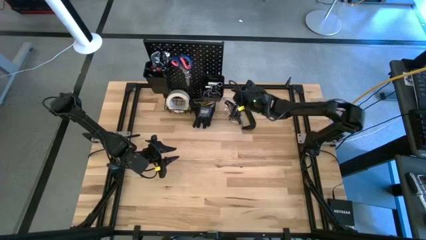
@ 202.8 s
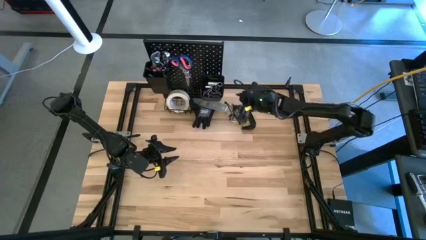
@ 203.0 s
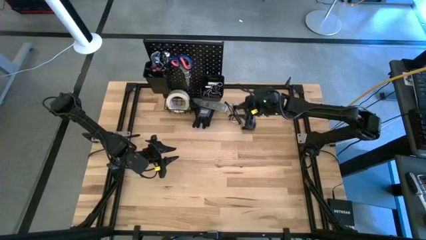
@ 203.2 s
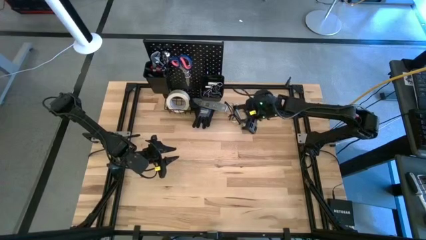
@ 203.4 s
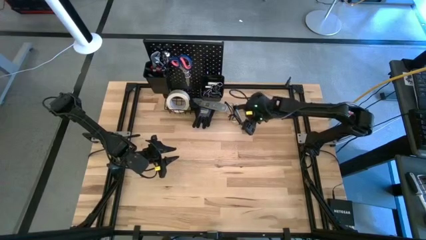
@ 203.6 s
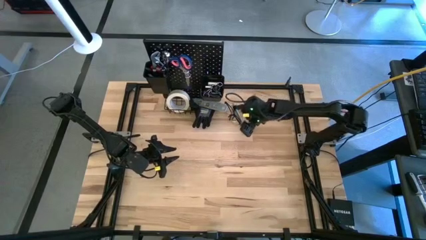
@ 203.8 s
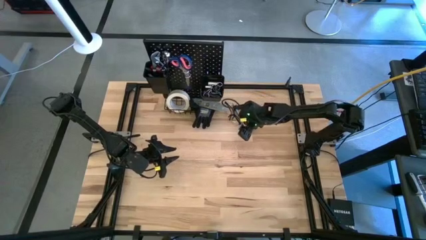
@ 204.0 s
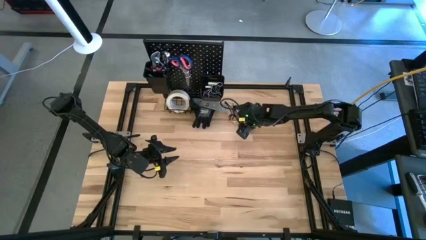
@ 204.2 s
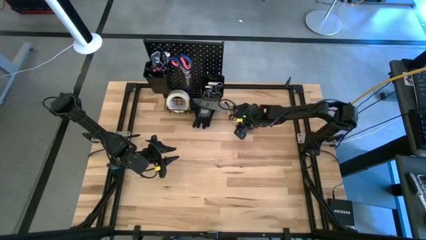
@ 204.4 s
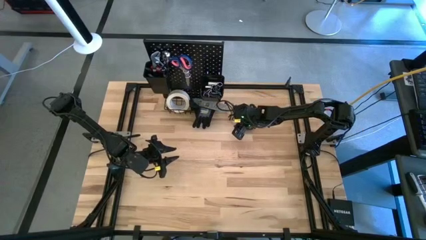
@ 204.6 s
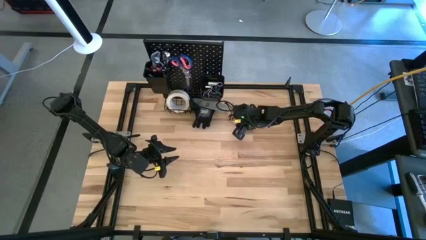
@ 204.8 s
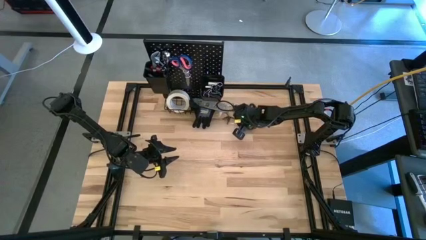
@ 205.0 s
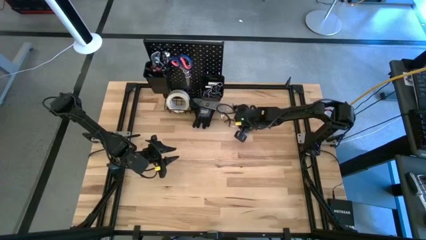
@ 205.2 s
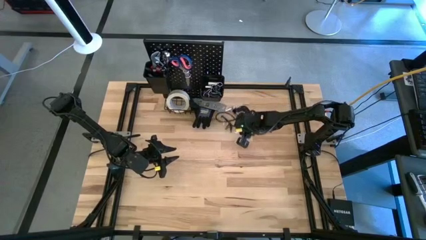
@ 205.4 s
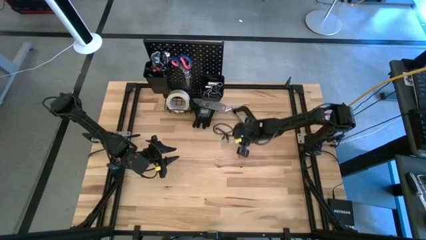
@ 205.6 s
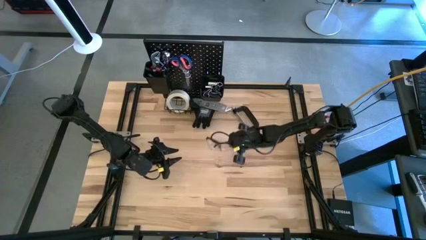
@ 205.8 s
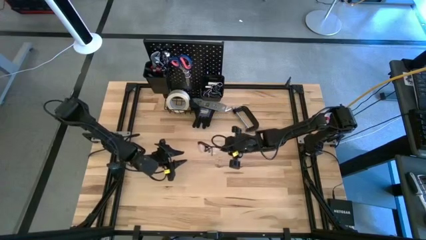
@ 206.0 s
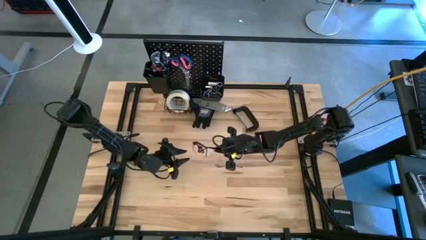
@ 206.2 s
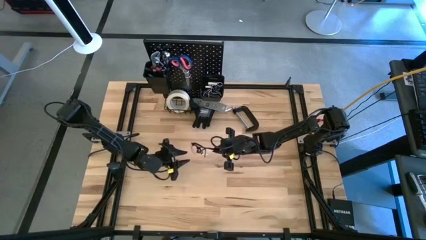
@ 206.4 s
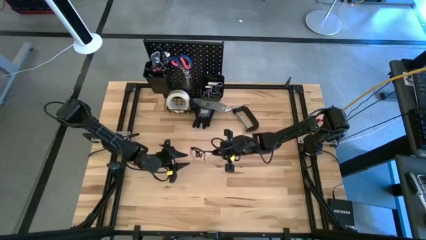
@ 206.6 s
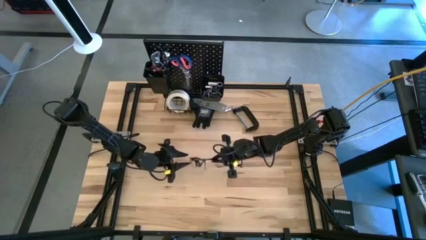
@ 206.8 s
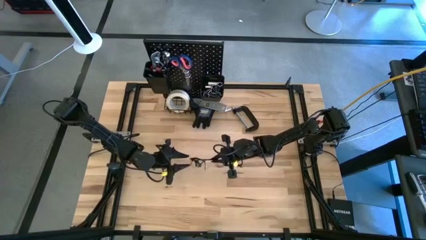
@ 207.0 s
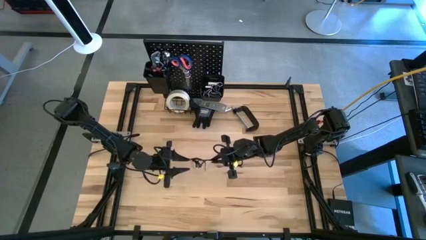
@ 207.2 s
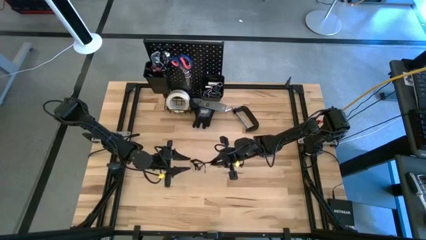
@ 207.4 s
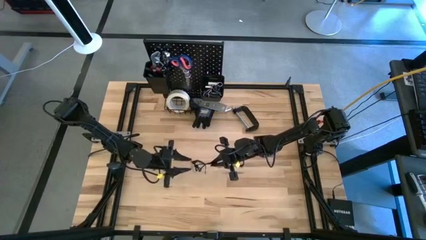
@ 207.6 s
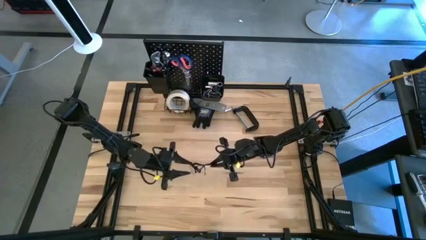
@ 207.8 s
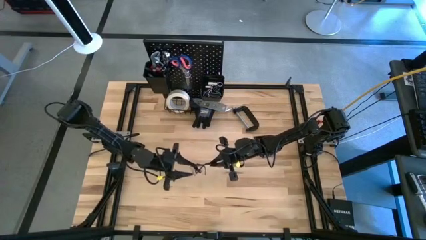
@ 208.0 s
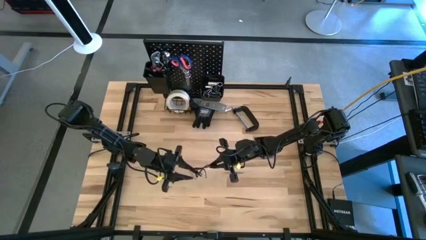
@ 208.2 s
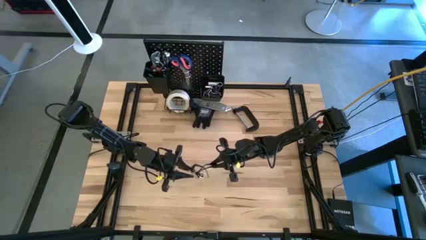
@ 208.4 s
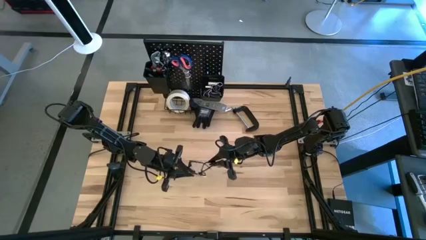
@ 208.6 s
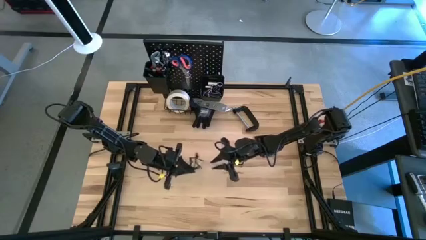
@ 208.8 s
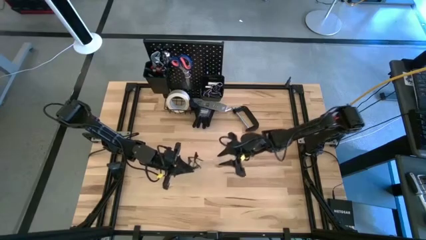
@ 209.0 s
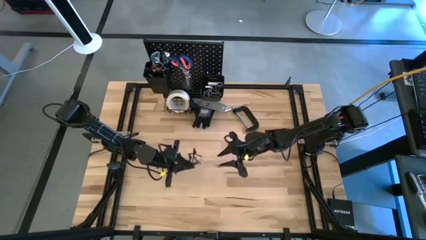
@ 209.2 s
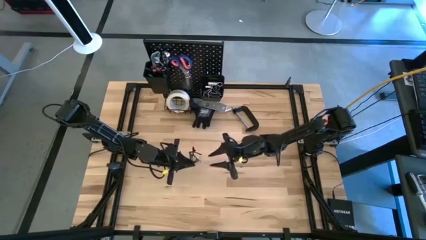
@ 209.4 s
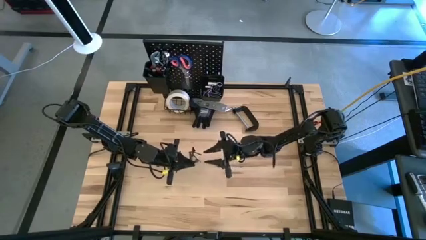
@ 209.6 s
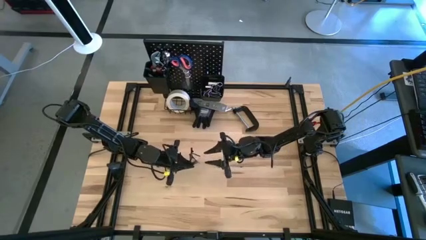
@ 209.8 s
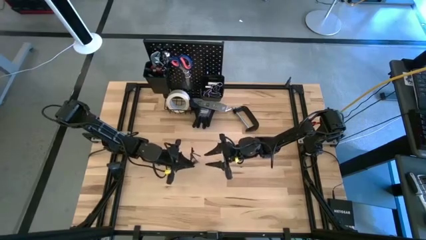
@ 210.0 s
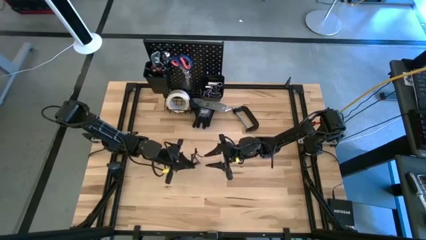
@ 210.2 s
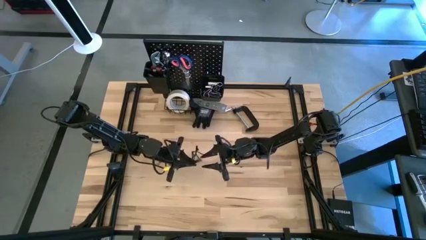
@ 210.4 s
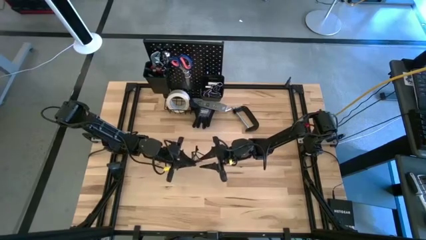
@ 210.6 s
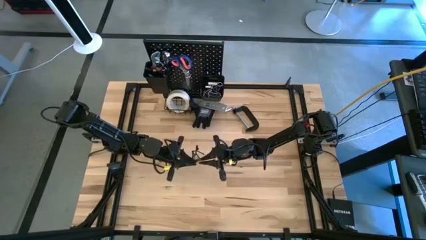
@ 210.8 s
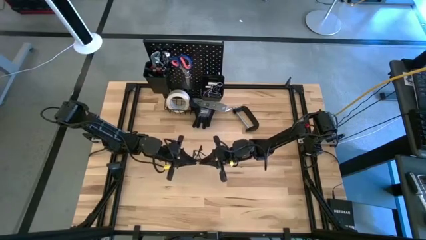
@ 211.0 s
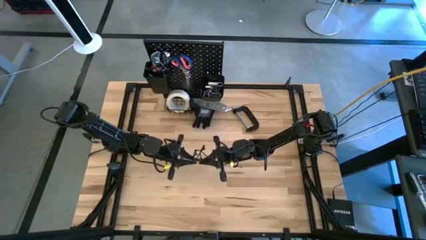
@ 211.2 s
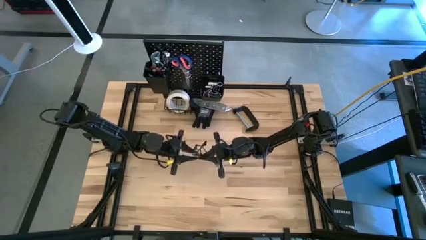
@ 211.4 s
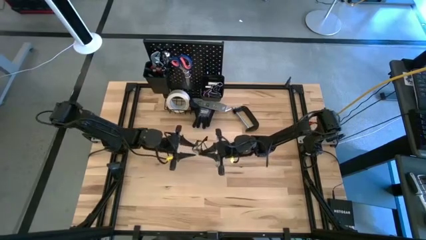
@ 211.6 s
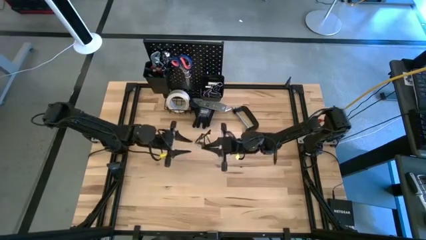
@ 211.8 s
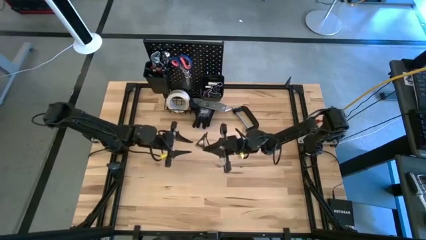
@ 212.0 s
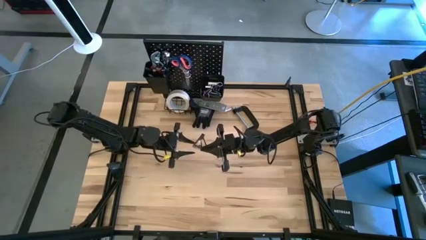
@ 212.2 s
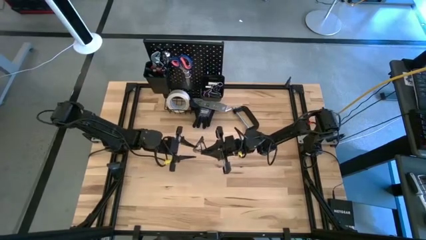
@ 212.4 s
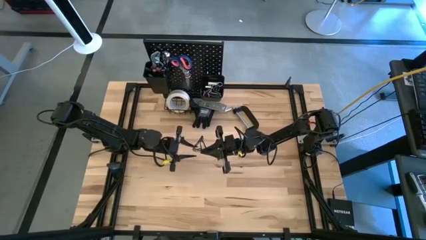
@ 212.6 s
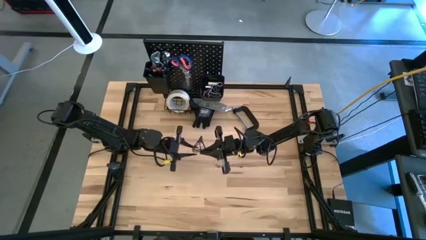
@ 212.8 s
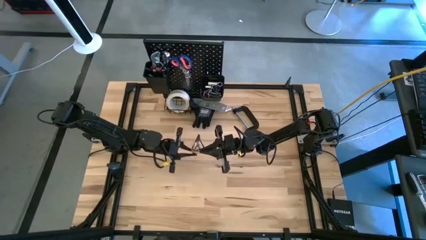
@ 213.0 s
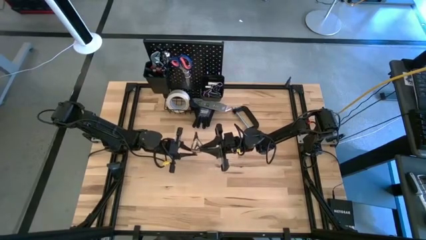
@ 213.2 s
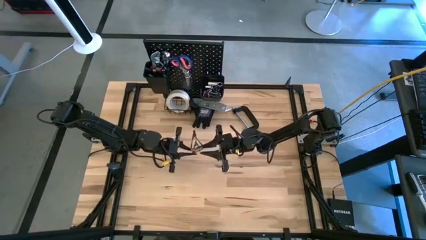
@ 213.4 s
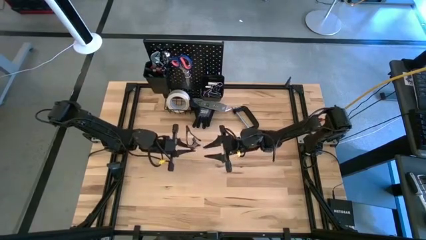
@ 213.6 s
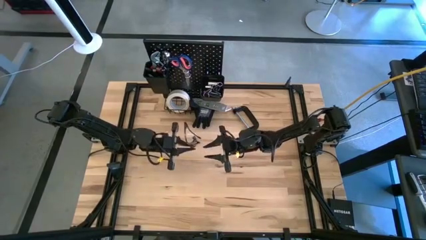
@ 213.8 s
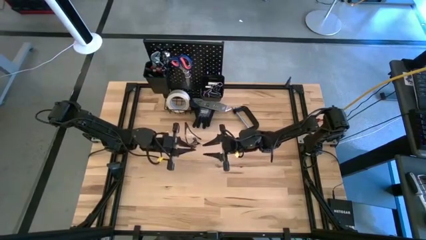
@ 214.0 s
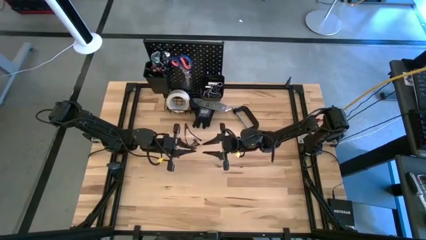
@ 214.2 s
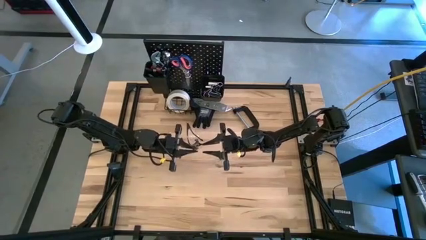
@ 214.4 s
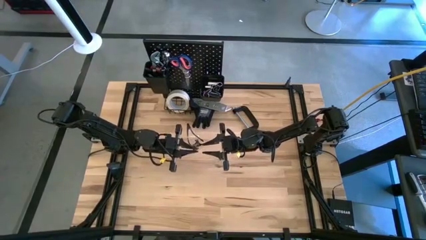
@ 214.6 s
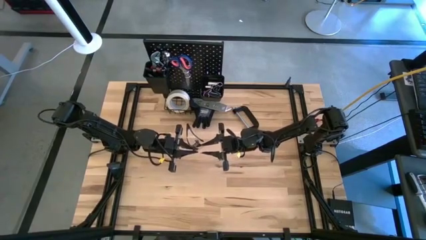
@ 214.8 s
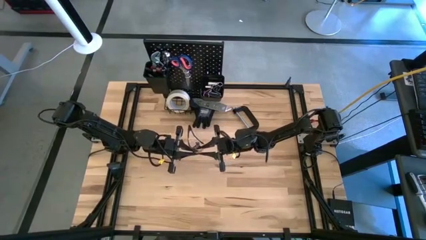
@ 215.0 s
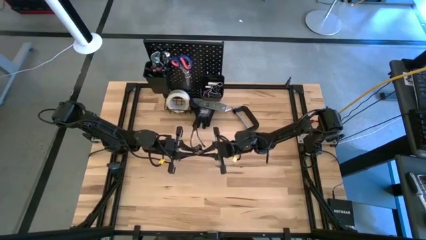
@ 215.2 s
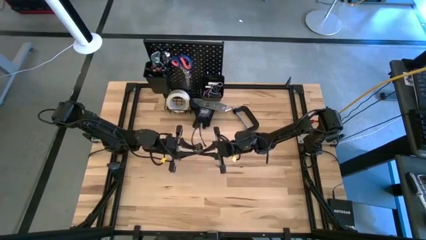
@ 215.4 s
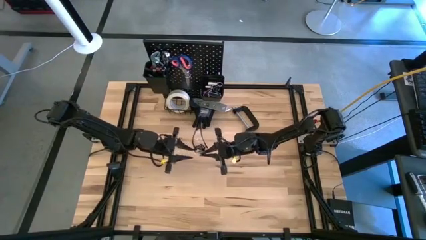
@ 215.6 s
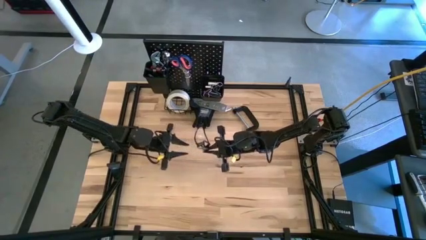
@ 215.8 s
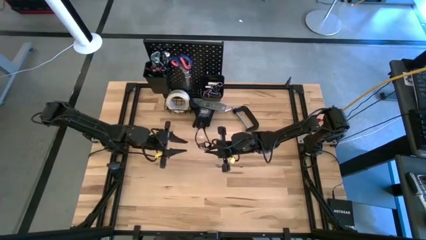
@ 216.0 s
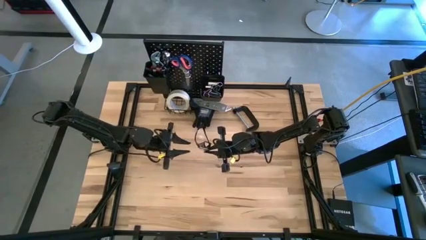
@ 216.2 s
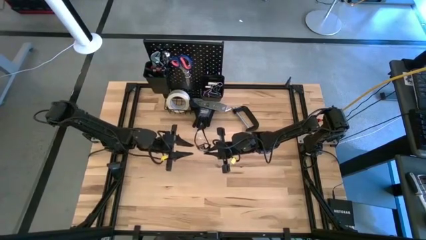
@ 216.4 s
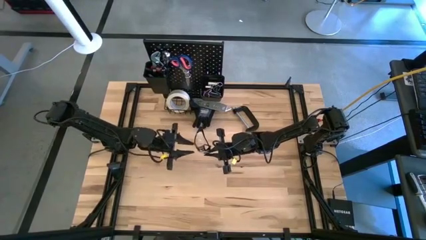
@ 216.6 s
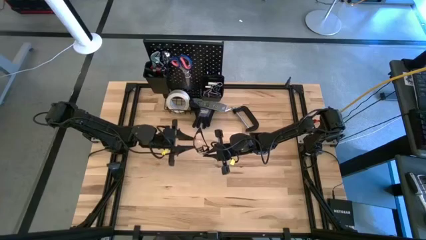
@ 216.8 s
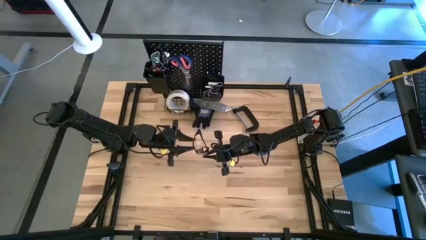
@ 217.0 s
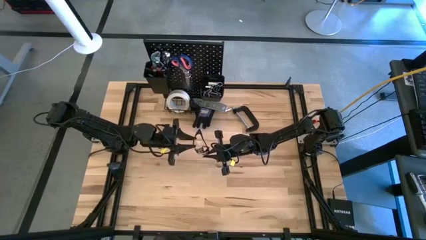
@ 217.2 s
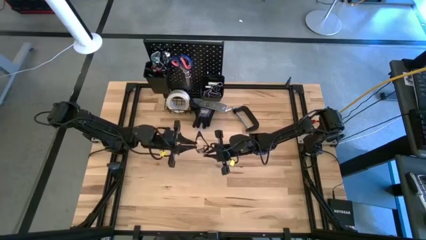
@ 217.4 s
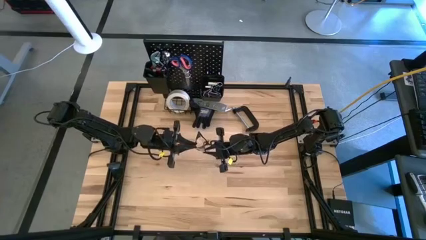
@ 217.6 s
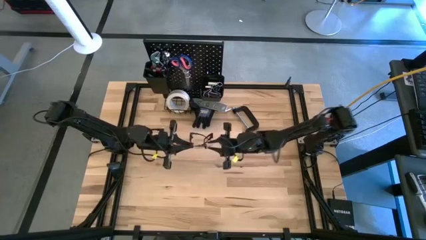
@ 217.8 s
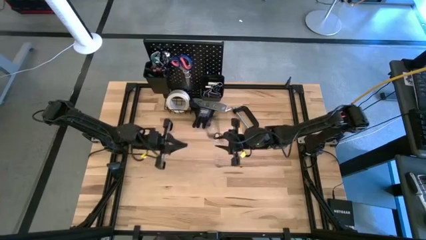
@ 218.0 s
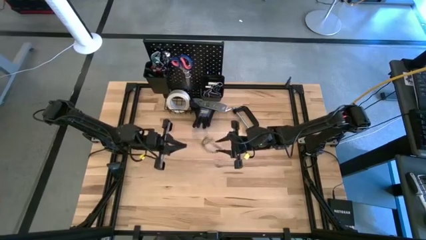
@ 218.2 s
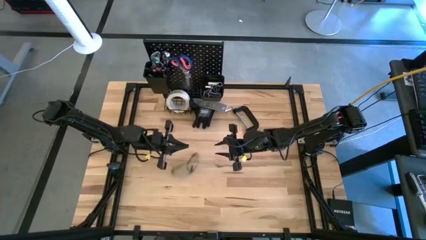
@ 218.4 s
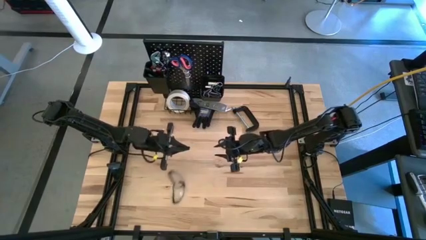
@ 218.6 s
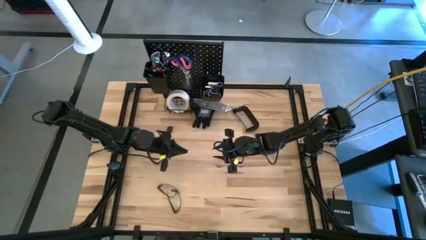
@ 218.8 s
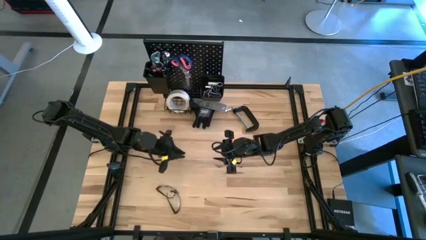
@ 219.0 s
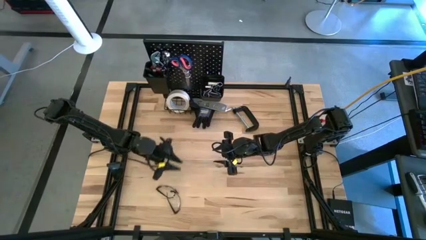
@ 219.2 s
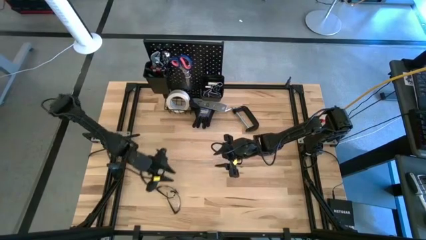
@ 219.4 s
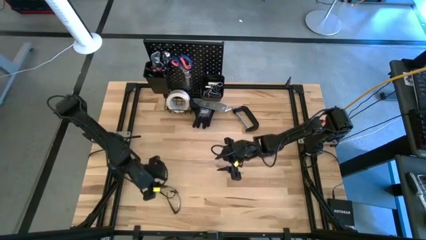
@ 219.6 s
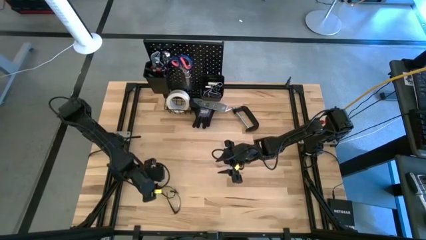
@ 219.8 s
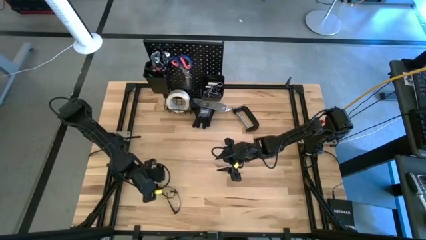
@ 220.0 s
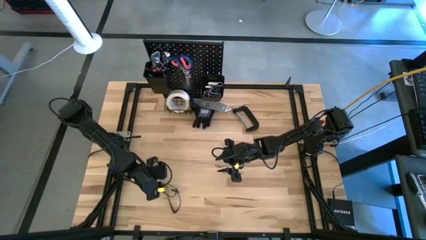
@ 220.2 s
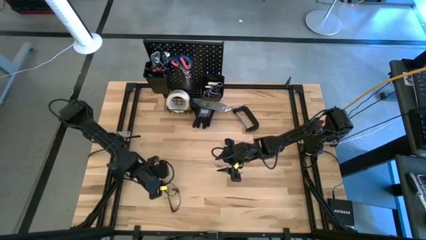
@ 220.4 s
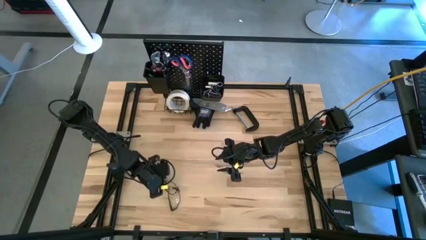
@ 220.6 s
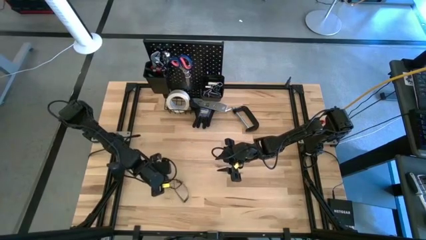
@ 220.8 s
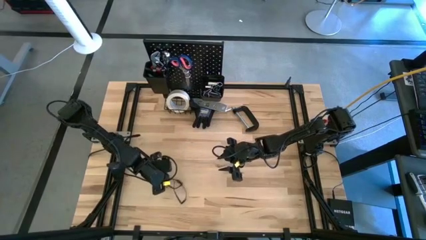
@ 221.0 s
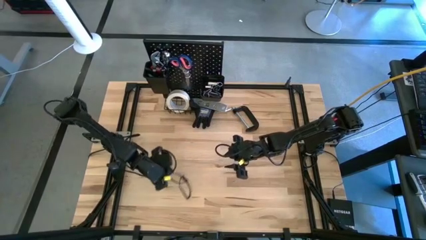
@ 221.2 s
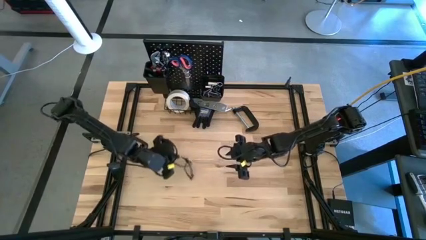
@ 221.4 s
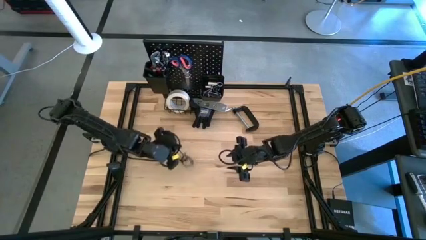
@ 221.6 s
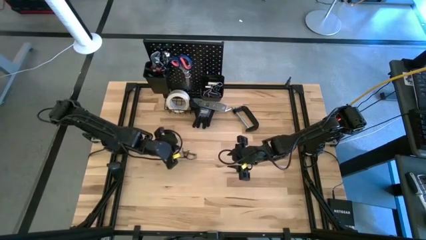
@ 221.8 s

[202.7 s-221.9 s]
Task: Hang tools onto peg board
Put the safety goggles into the wire basket on the pegboard
